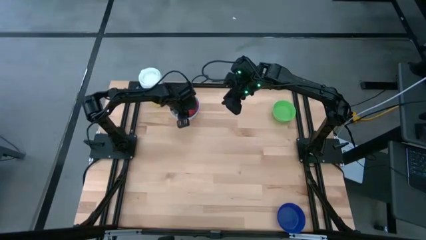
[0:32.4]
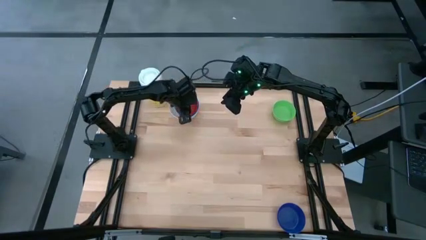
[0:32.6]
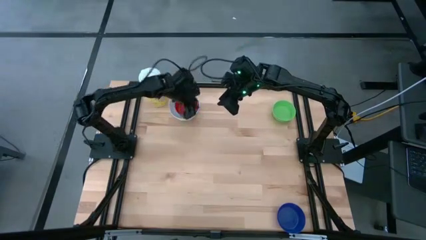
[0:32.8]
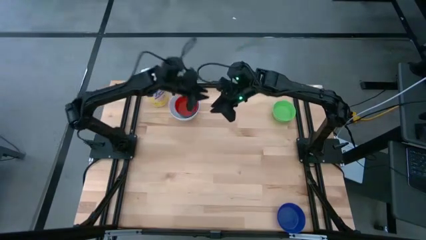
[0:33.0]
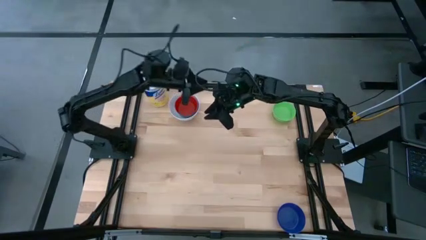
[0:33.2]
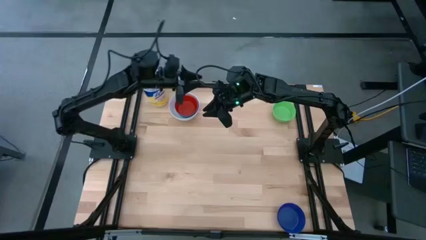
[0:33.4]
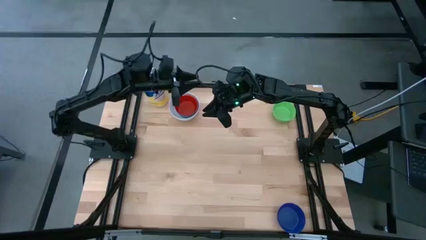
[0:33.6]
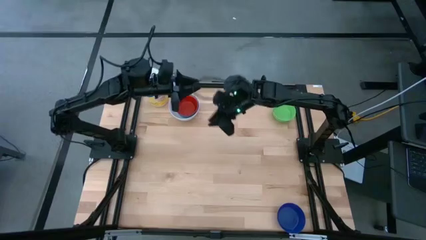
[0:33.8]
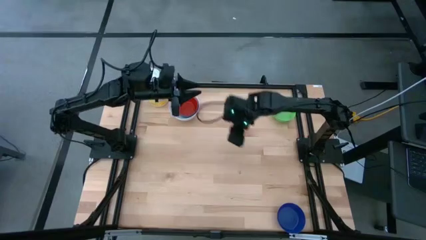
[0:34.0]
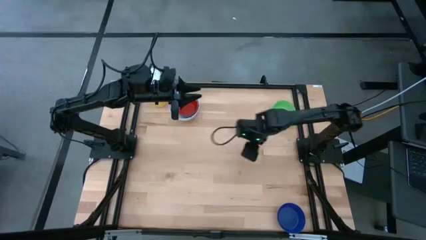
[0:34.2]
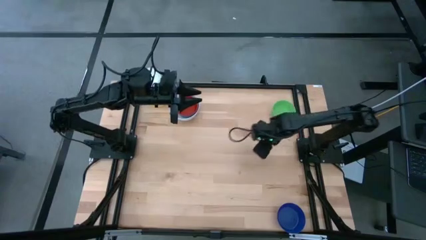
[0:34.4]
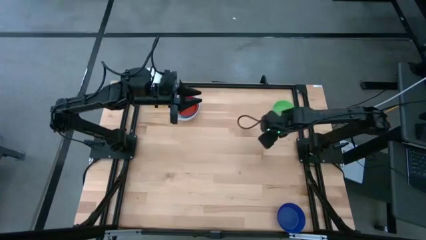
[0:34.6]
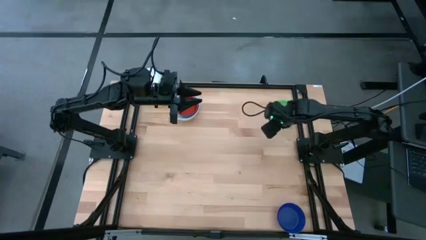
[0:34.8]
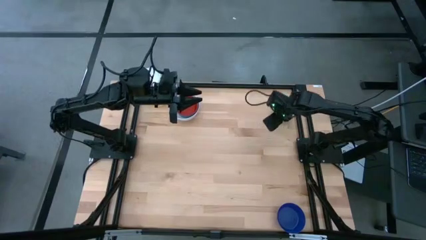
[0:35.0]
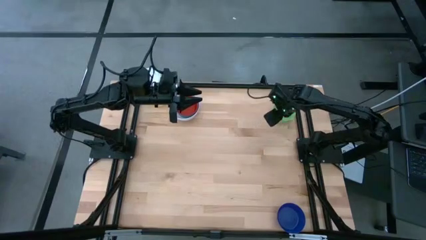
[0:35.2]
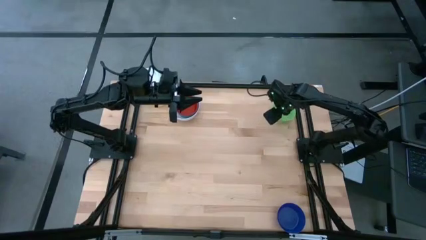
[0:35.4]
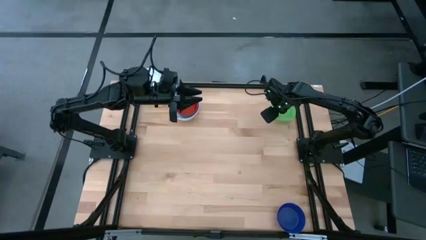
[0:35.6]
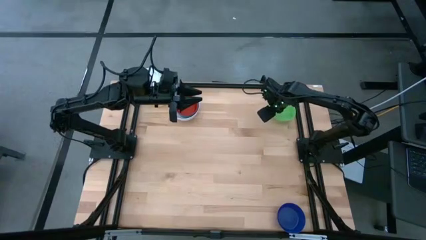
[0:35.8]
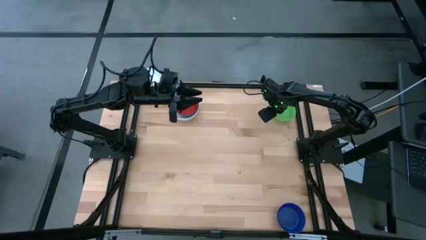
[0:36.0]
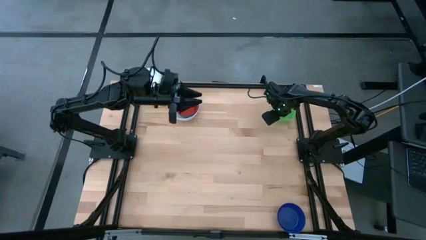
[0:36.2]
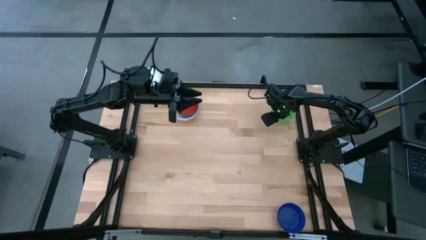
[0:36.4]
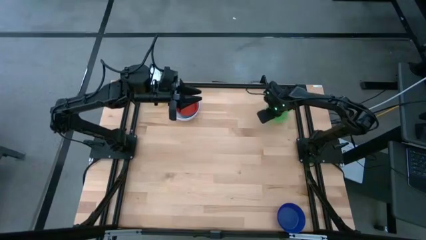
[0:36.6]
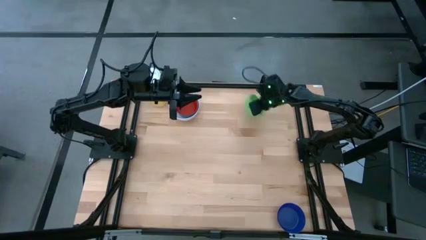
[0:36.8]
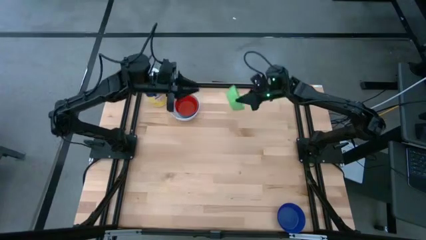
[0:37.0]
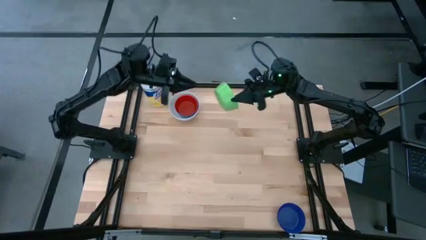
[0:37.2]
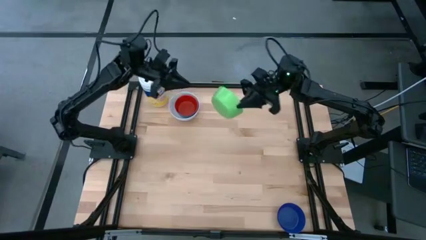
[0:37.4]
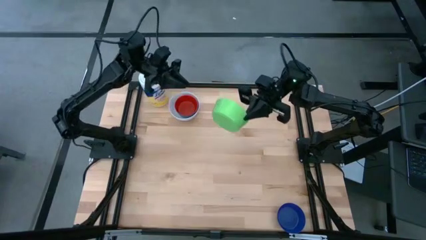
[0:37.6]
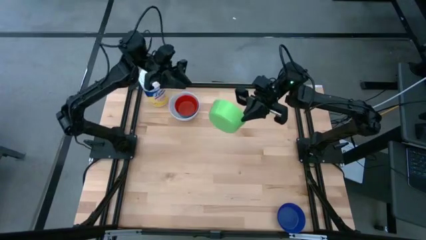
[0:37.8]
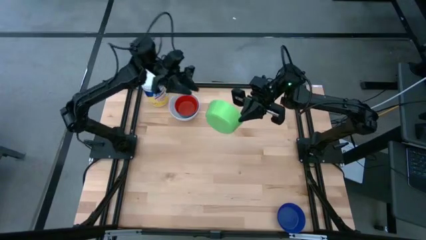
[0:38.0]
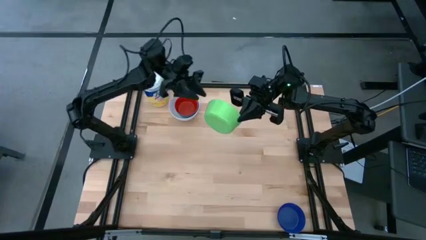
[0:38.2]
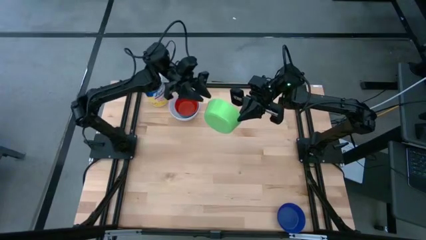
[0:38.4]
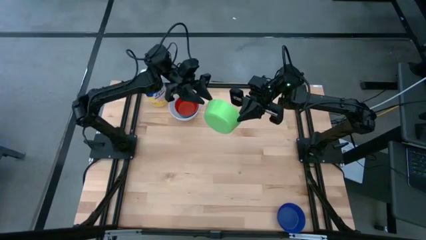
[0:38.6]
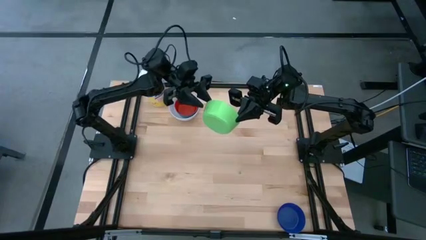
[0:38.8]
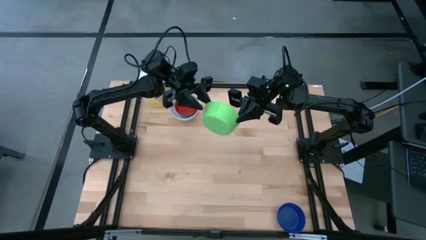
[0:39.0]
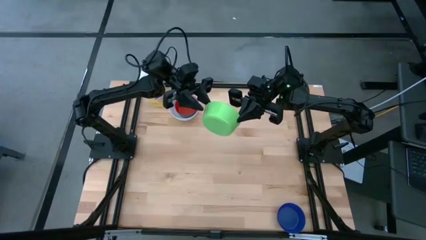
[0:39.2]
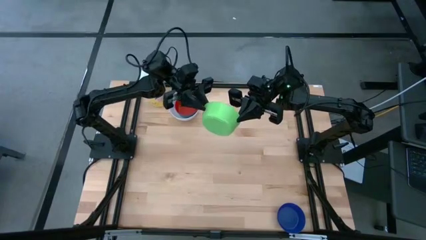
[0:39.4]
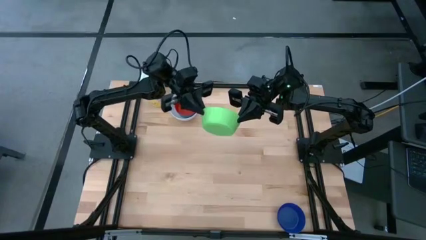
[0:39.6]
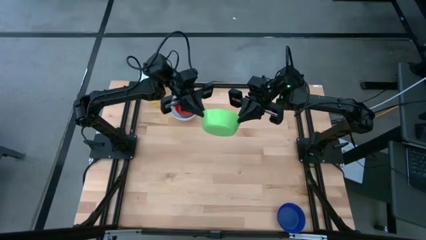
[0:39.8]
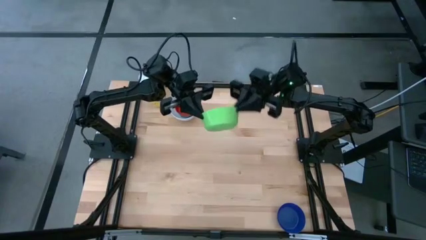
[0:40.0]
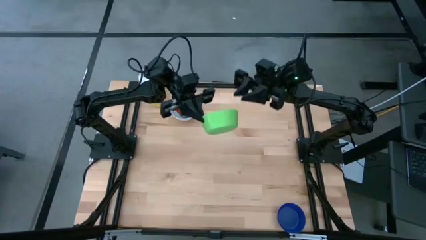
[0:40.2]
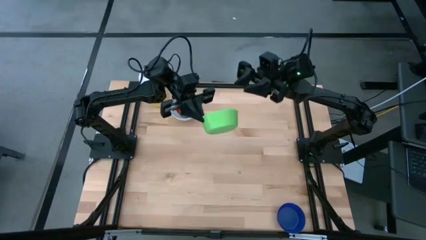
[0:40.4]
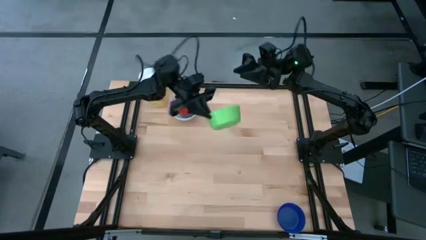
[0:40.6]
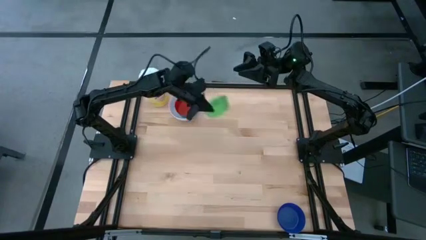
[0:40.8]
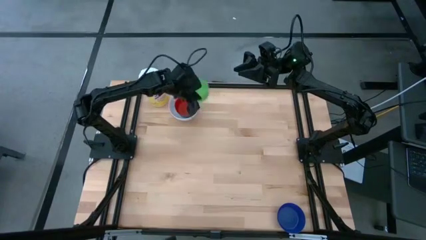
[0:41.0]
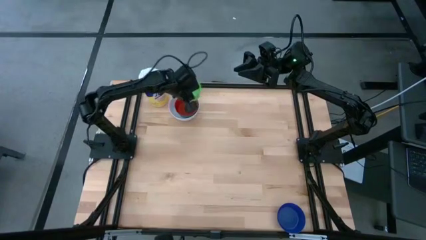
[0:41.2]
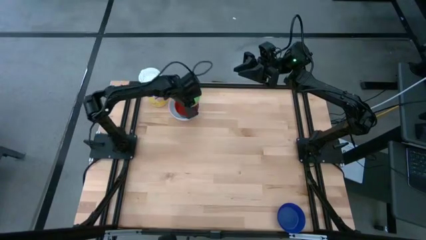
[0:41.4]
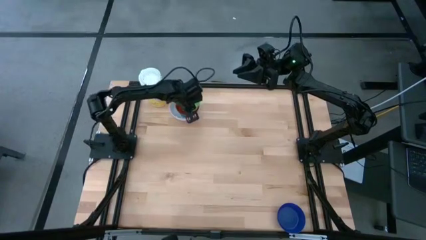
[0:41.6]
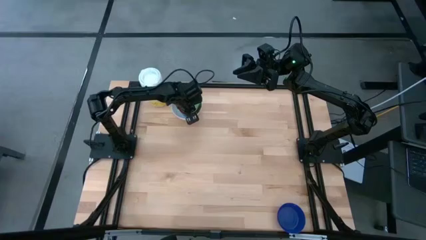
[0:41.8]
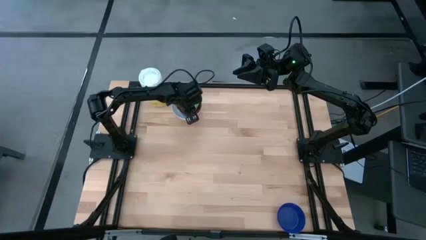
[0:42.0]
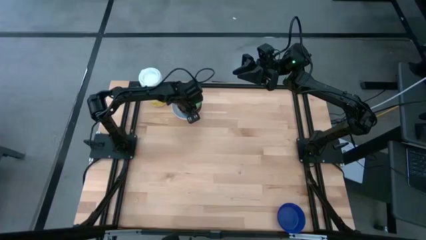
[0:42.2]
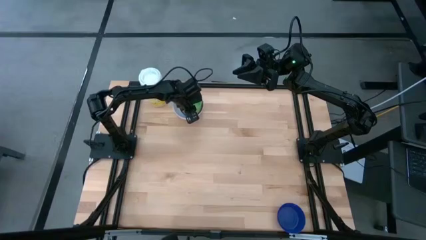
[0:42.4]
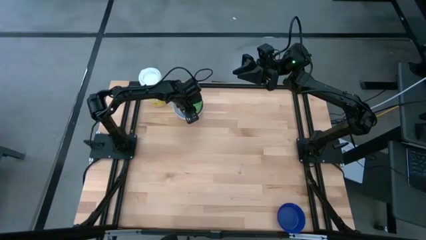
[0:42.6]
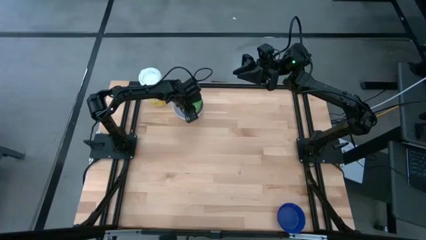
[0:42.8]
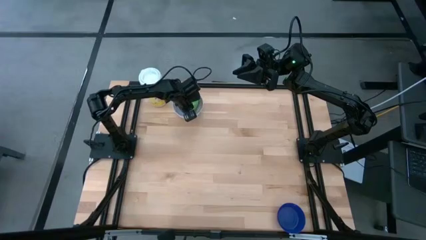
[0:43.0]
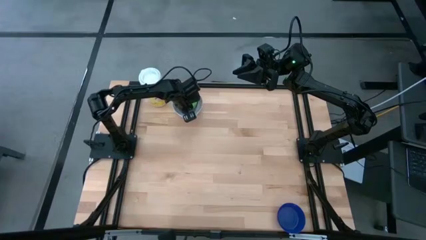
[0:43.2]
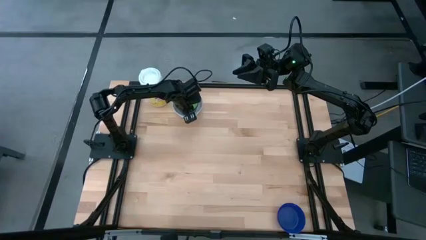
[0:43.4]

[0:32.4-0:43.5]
Stack the green bowl on top of the red bowl

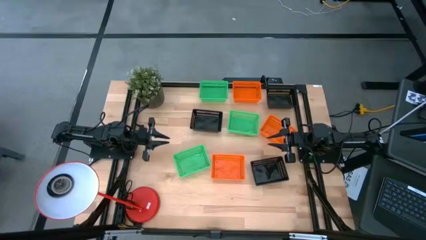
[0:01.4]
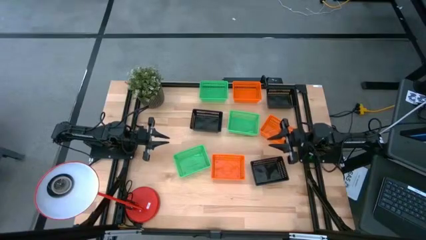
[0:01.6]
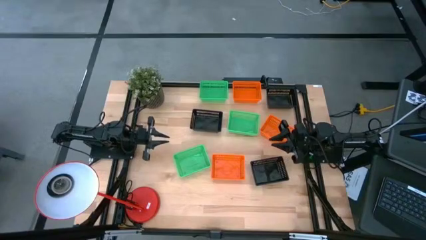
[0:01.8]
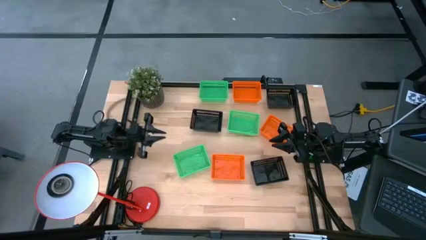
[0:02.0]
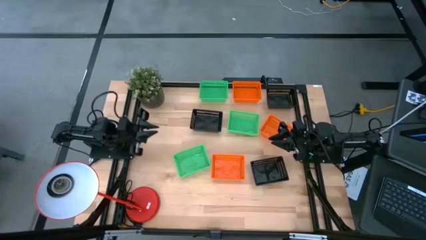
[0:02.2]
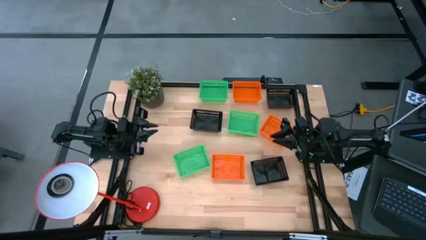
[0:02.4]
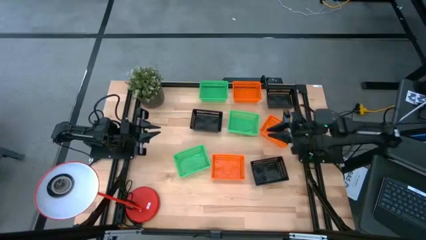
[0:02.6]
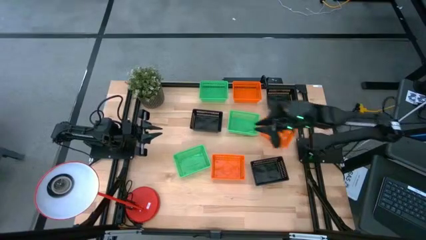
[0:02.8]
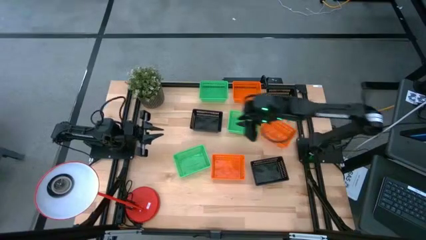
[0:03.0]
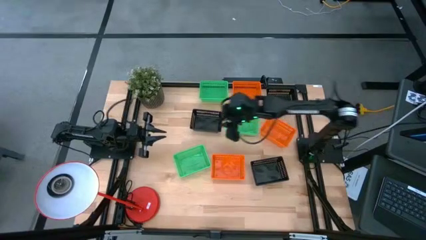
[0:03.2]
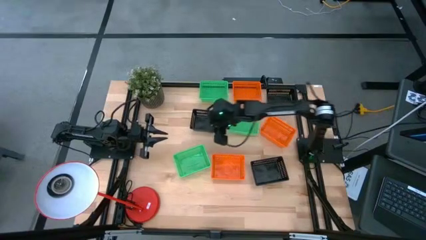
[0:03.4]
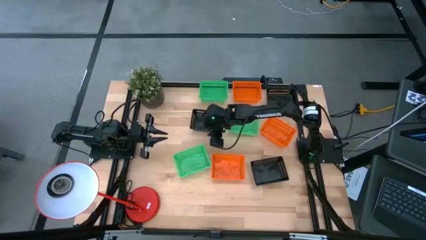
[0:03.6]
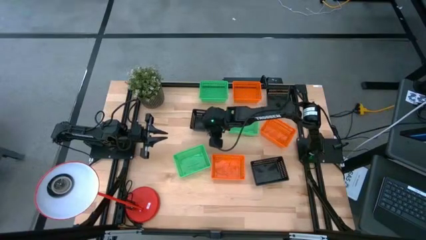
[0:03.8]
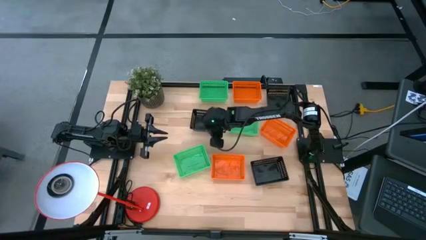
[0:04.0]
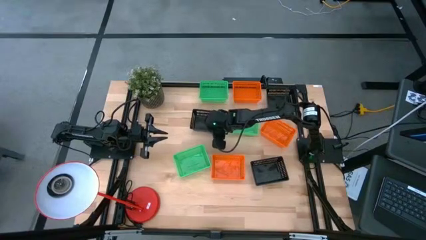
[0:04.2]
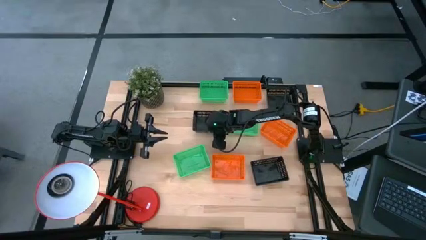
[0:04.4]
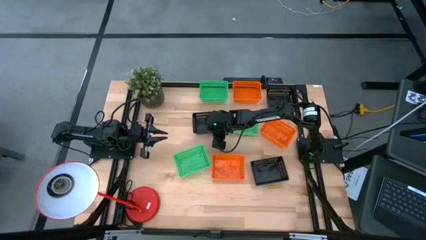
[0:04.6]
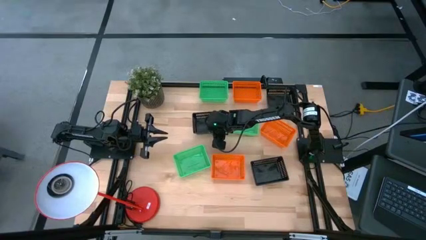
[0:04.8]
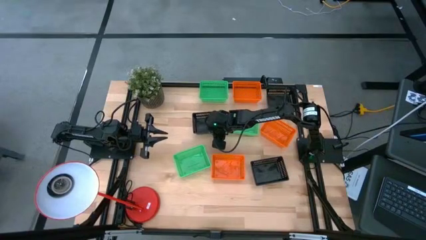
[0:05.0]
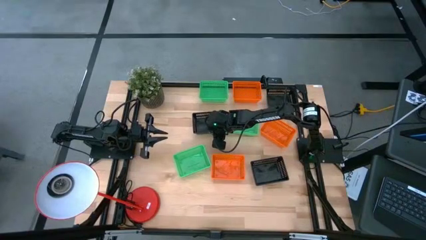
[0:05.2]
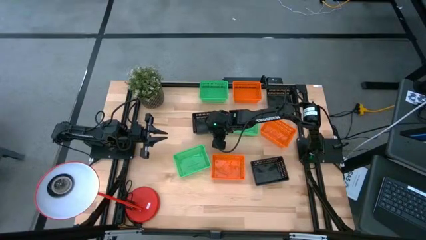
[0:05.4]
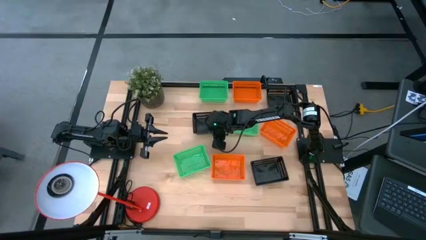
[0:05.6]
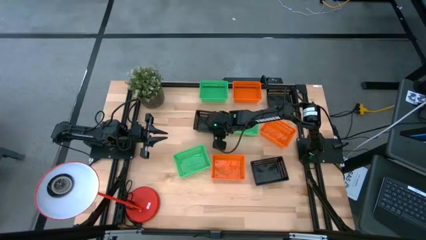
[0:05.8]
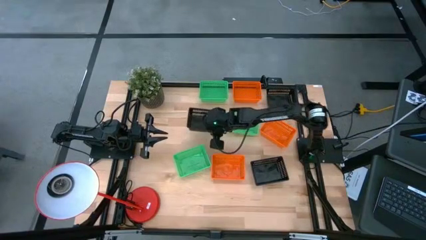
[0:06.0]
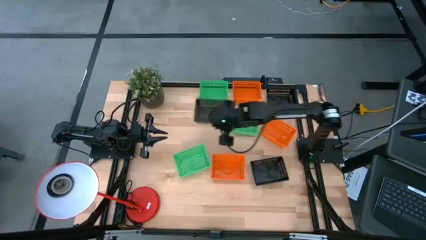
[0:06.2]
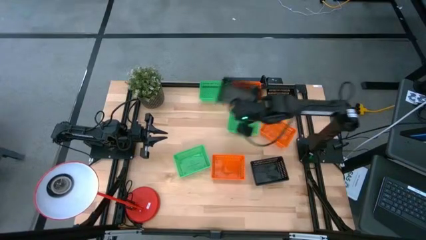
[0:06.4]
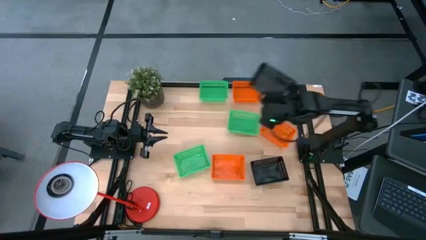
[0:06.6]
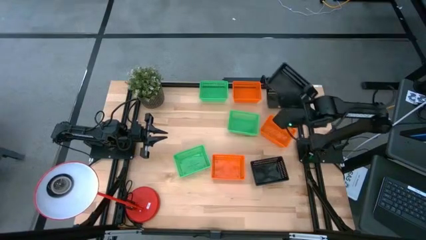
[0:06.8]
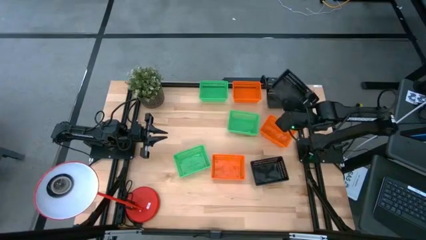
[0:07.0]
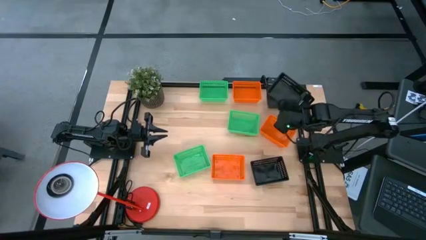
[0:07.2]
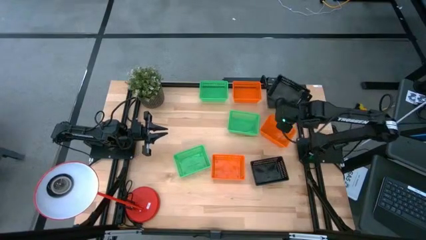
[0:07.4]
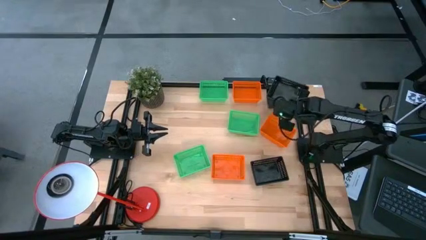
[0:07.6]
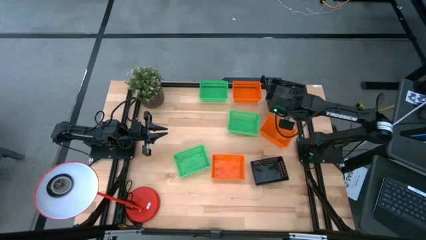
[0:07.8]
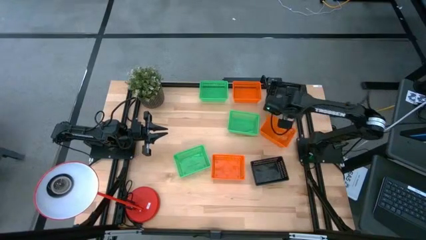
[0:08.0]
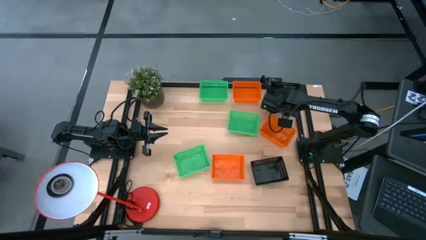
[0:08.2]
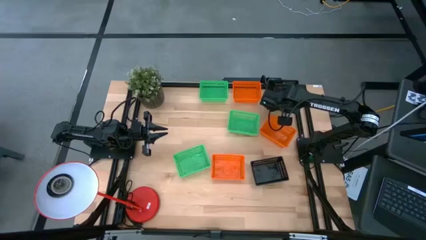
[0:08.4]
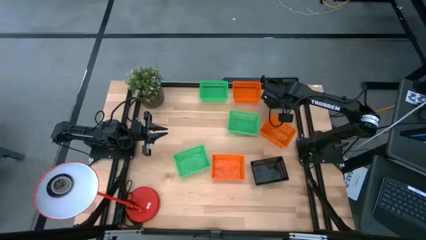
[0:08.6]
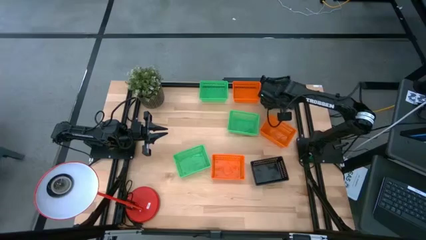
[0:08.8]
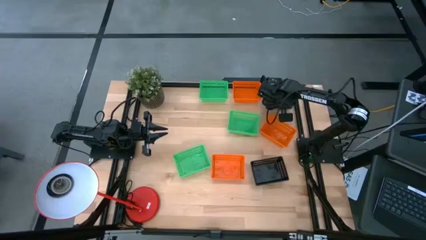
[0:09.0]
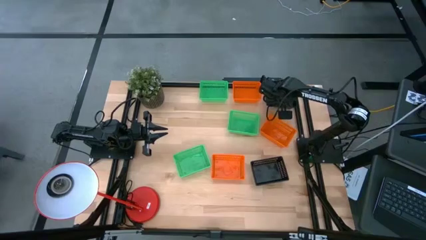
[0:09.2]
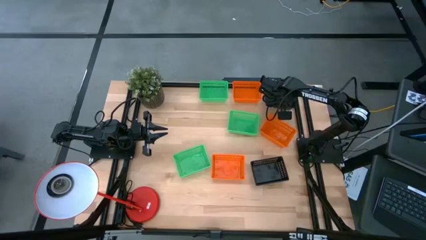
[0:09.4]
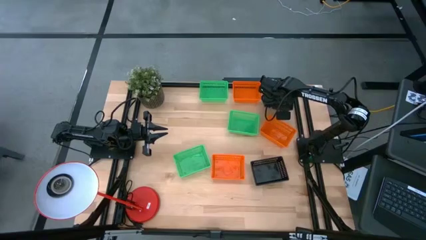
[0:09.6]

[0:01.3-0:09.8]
Stack the middle black bin on top of the top black bin
